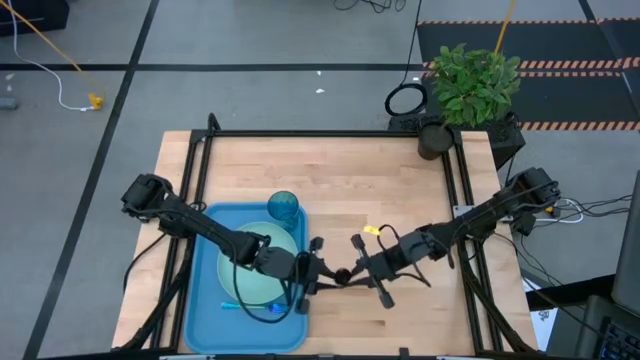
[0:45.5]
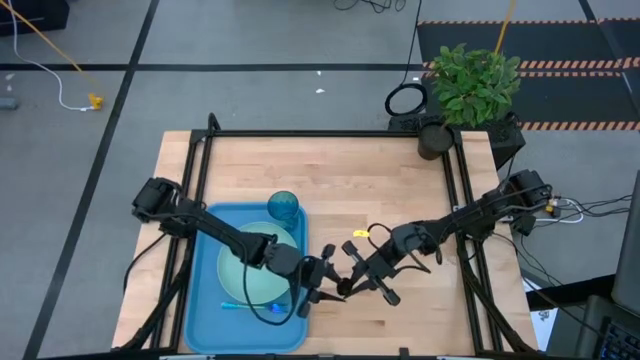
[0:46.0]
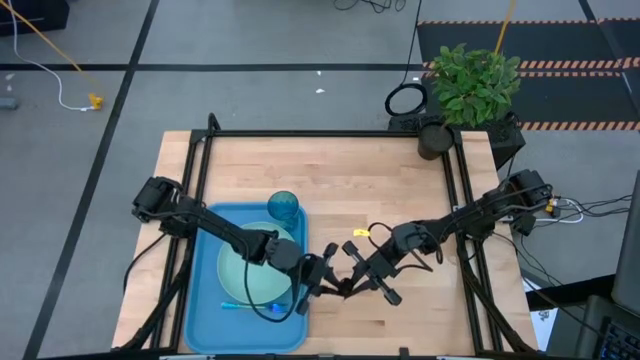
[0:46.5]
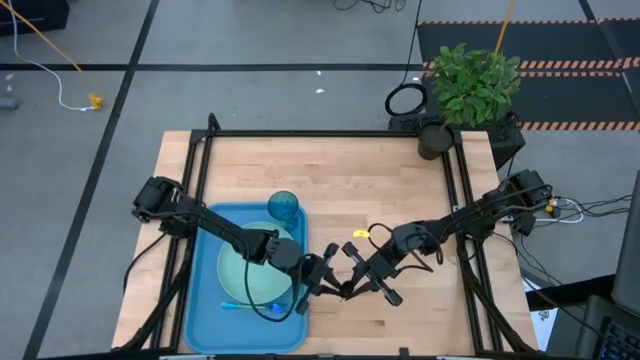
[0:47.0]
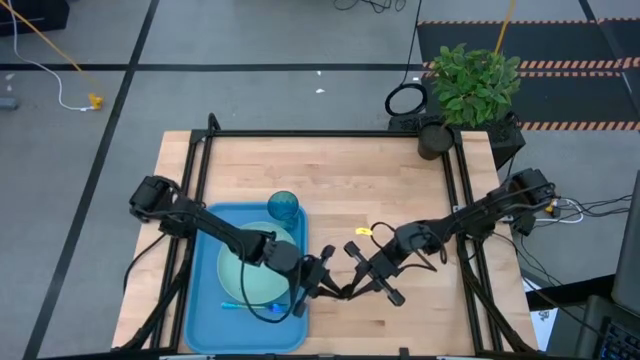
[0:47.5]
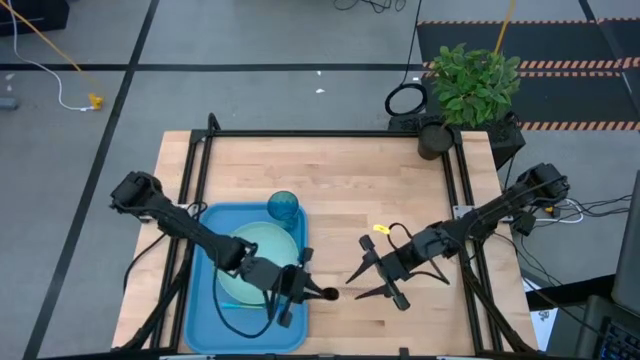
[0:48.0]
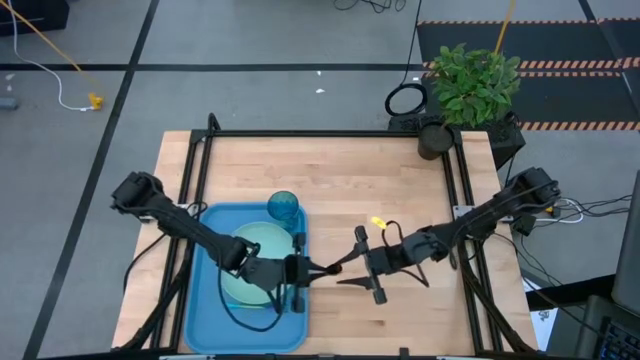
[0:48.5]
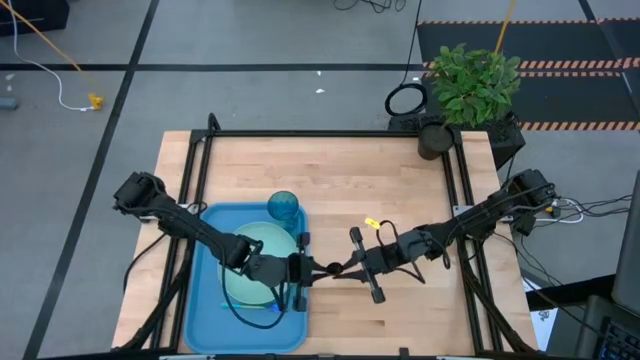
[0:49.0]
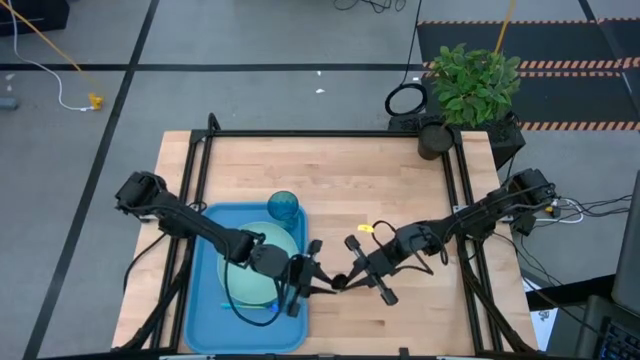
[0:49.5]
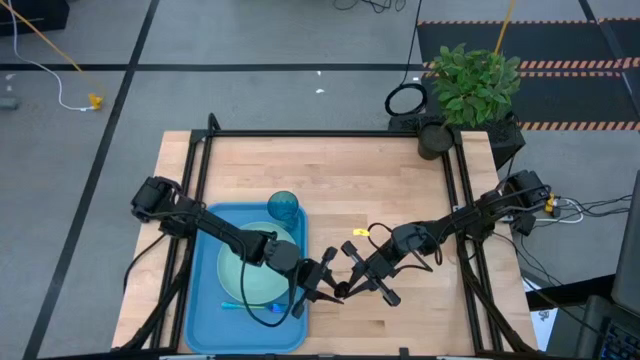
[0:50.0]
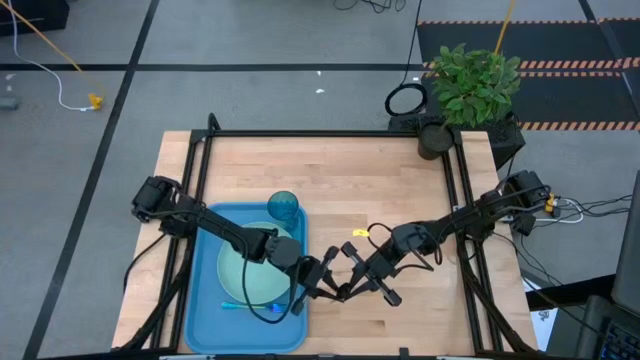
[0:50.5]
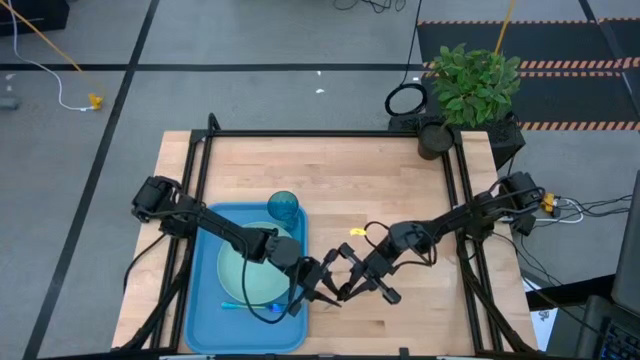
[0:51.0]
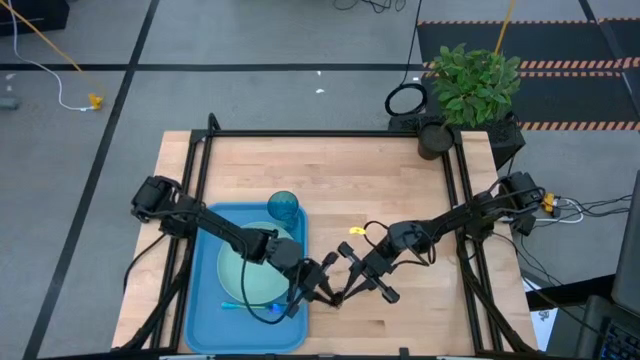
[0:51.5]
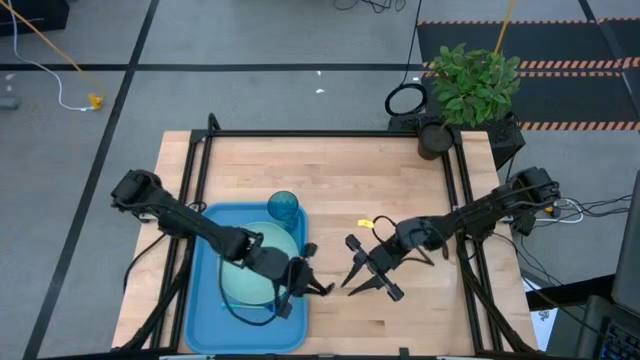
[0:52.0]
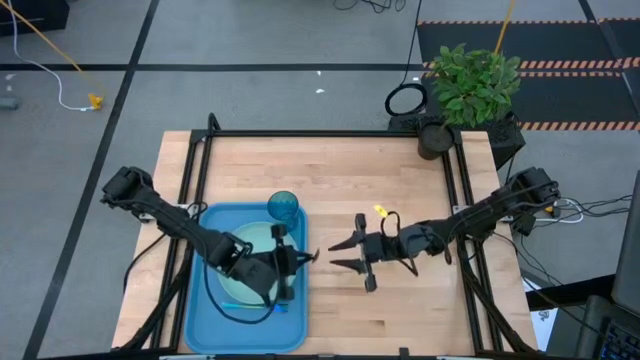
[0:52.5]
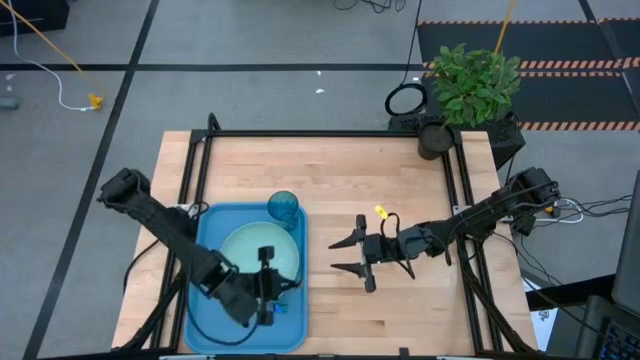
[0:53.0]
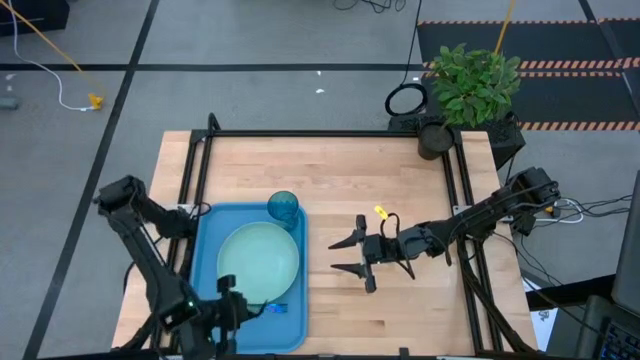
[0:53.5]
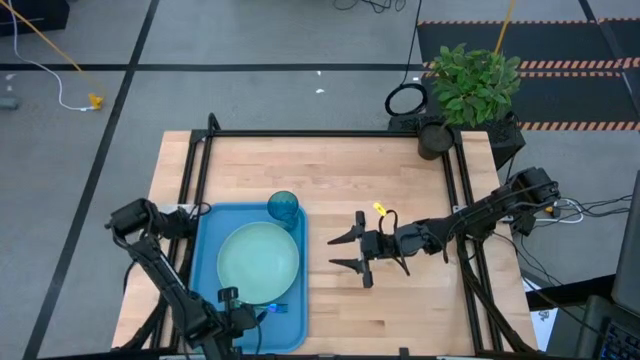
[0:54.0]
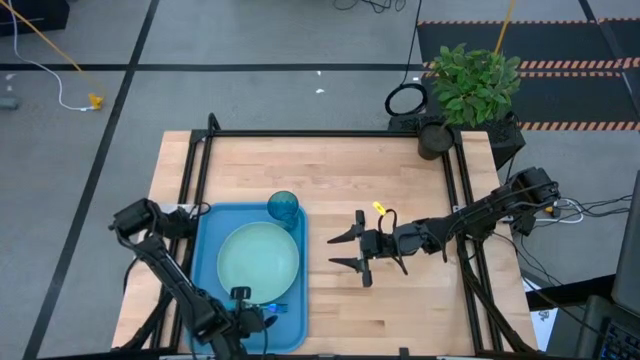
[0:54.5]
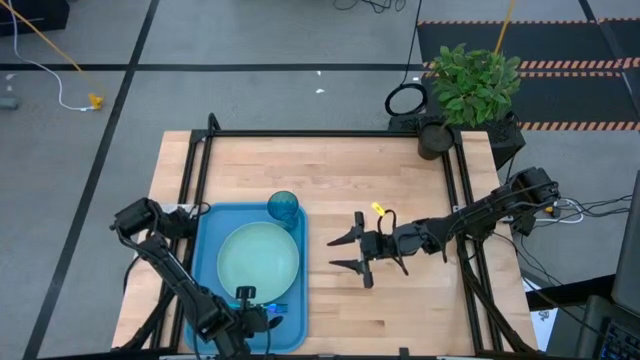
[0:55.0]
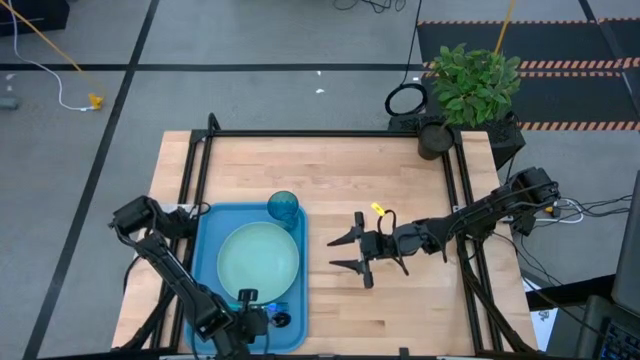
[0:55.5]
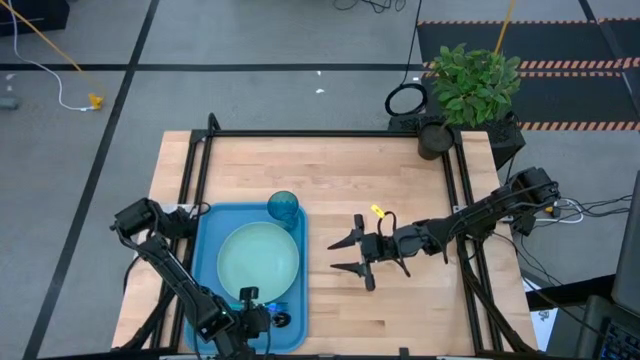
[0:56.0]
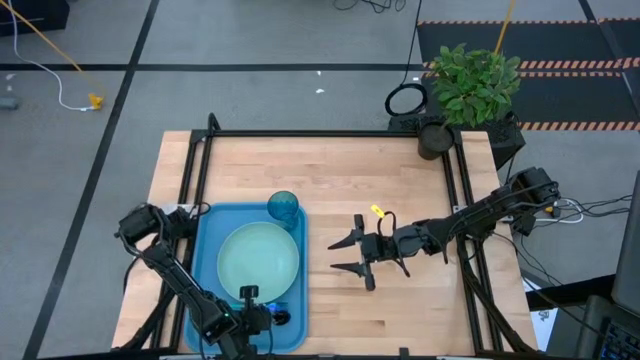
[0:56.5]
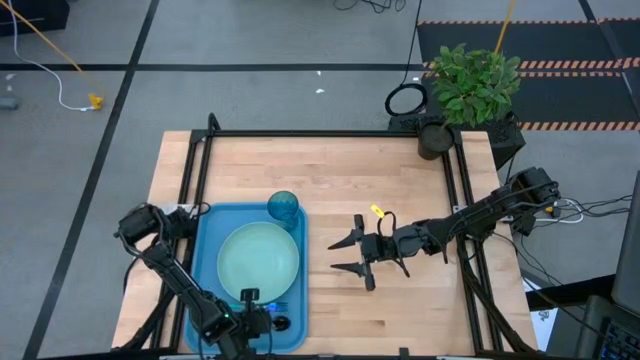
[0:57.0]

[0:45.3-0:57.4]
Task: Pick and place plate/cup/fork/spoon on tray
Put the black spoon on the blue tray to the bottom of the blue fork

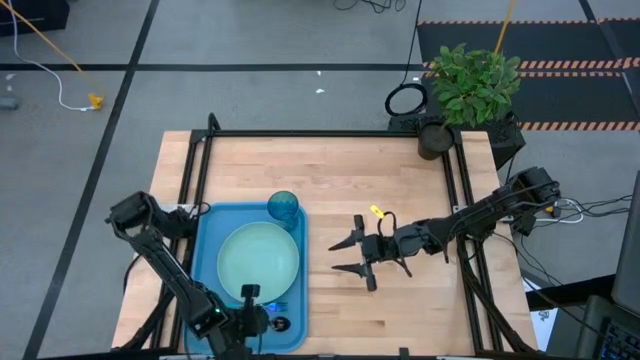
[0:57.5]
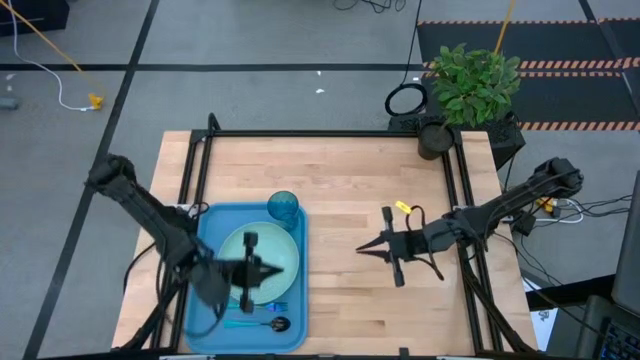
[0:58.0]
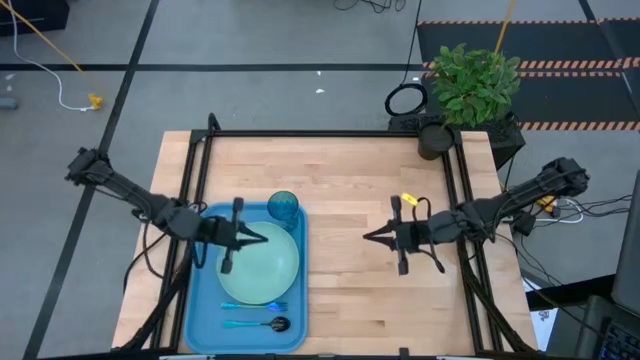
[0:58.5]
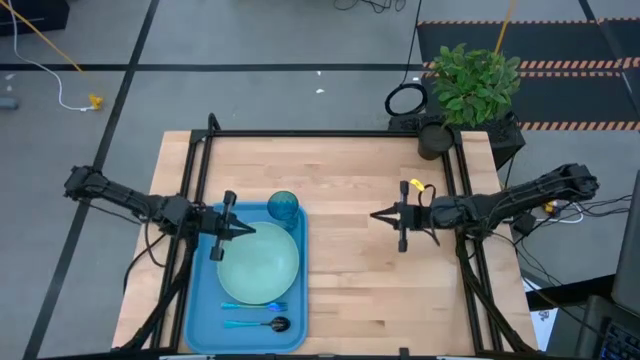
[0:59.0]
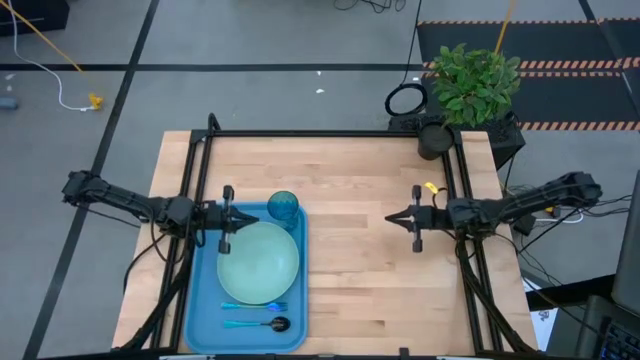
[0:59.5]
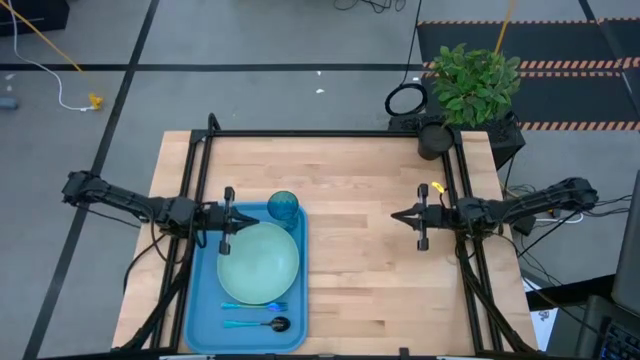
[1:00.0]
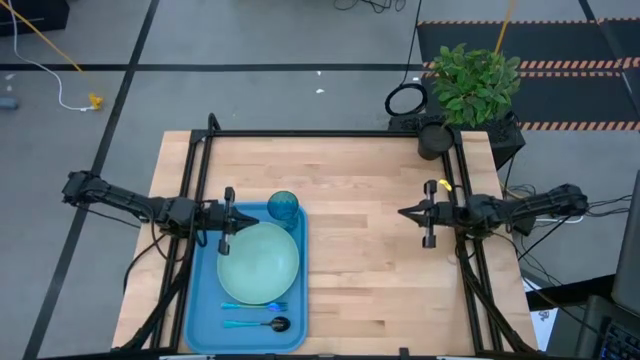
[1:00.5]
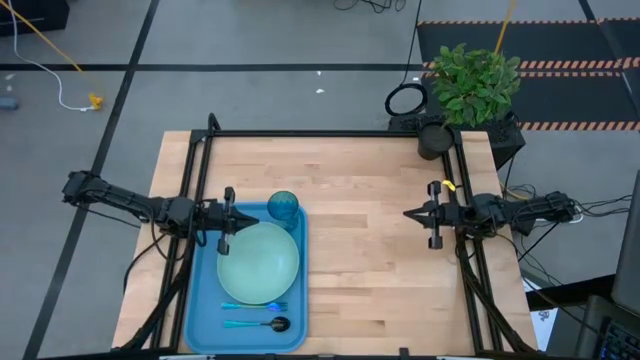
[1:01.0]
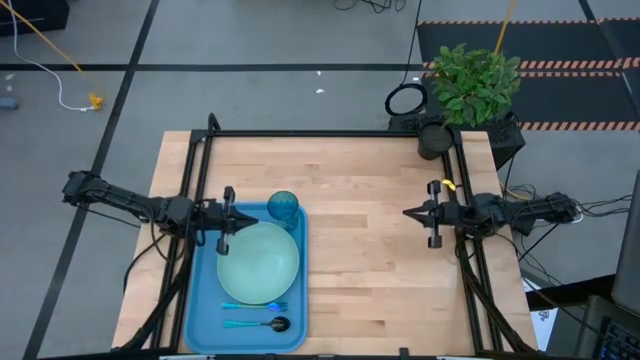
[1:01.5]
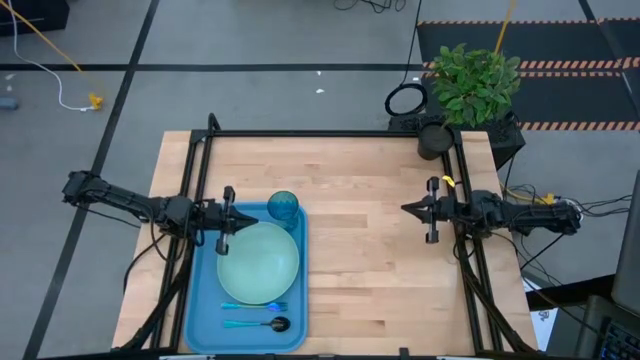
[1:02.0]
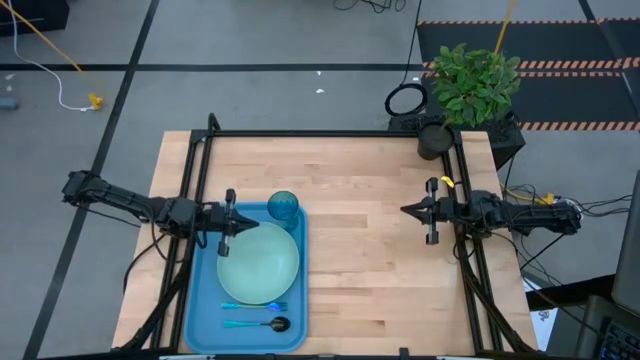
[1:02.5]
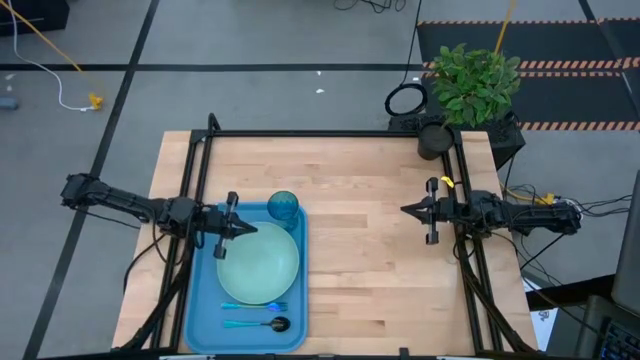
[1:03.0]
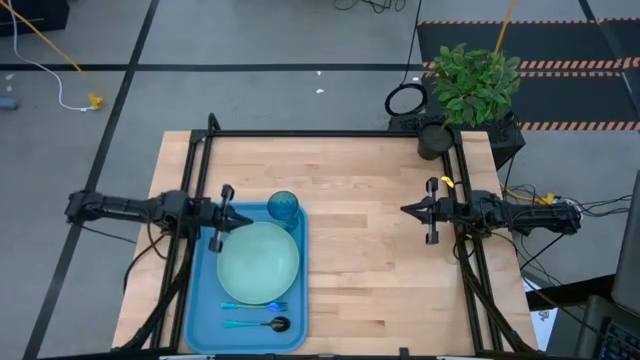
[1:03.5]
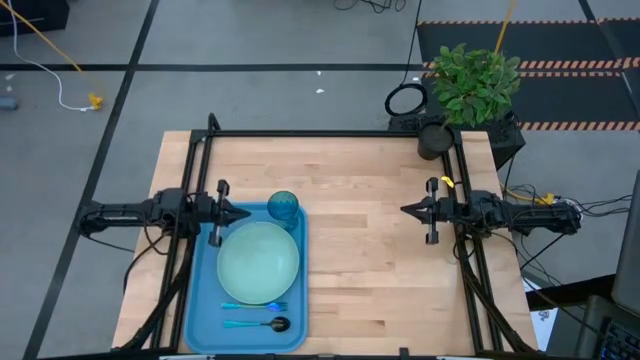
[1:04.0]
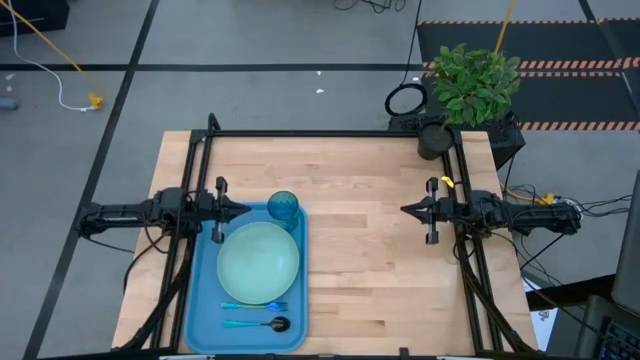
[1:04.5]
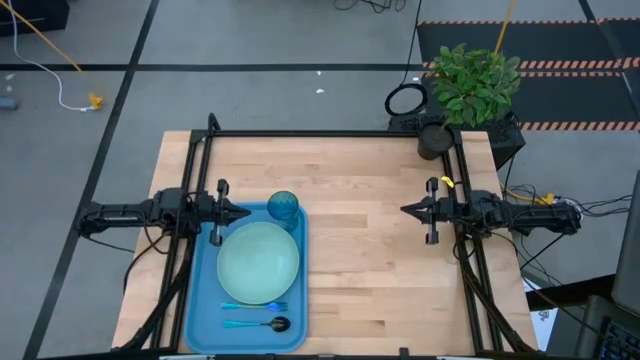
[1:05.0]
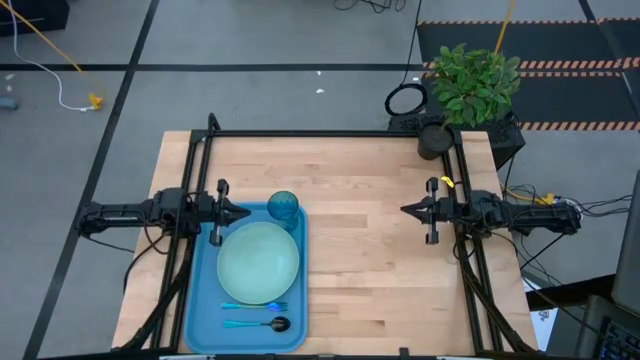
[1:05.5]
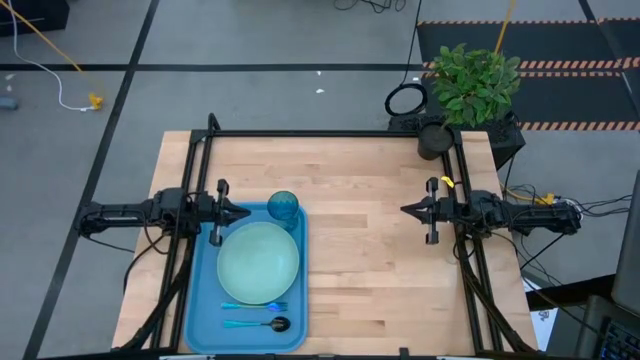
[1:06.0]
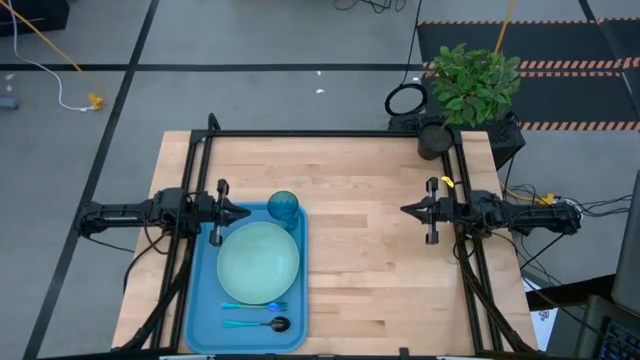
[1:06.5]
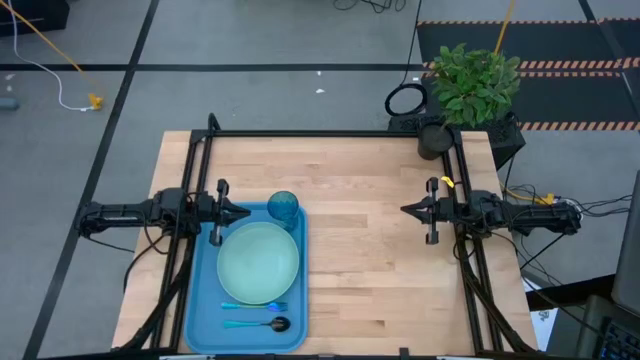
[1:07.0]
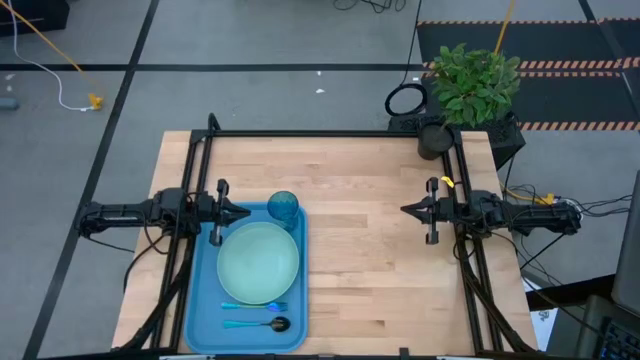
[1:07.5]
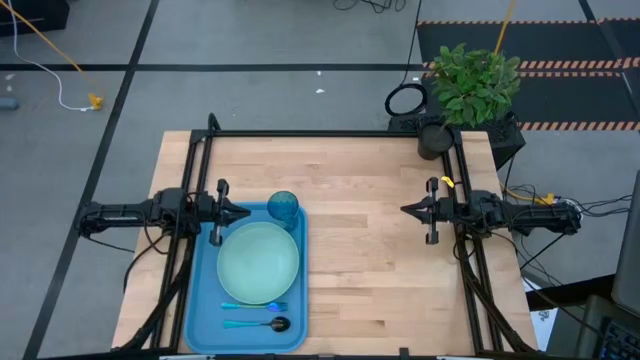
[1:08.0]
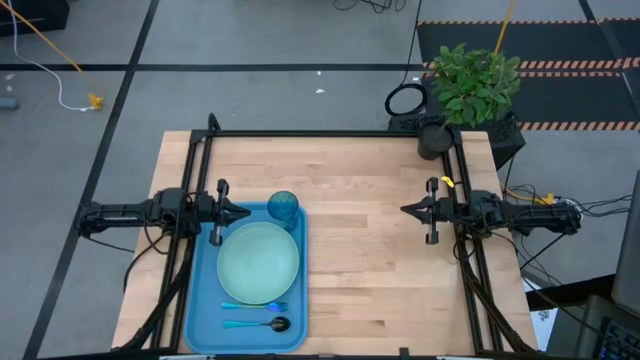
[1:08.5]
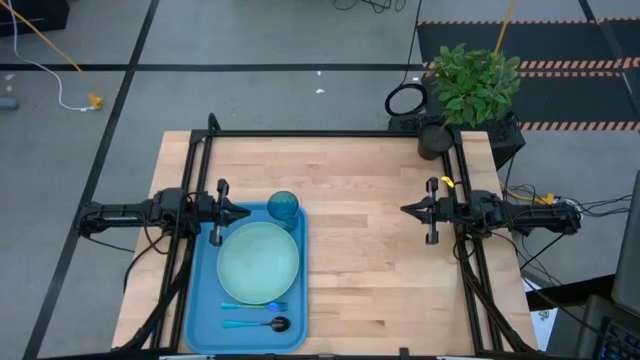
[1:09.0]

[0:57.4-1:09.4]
Return to Home Position
